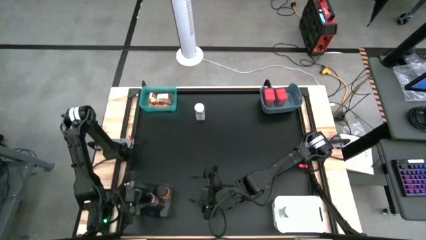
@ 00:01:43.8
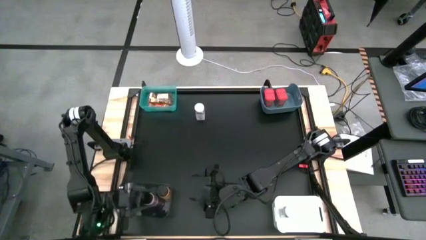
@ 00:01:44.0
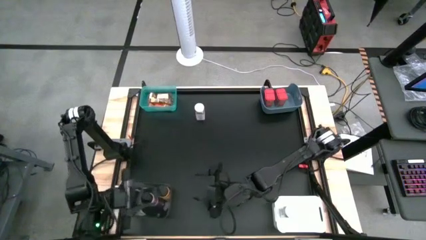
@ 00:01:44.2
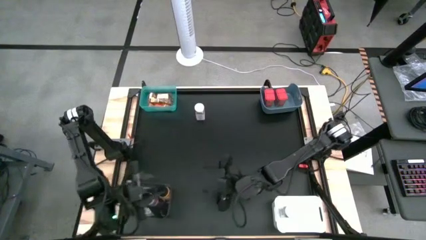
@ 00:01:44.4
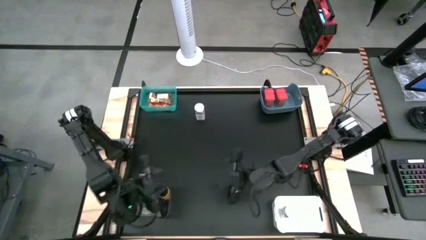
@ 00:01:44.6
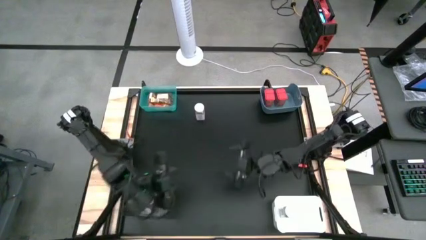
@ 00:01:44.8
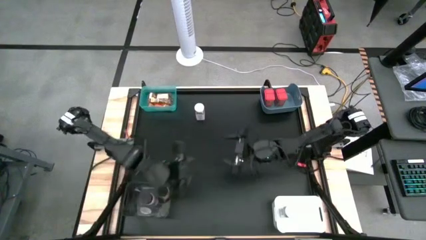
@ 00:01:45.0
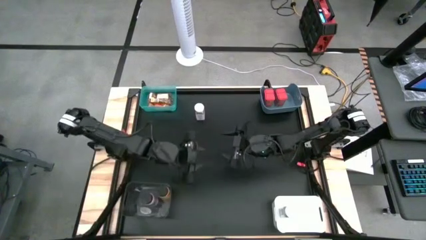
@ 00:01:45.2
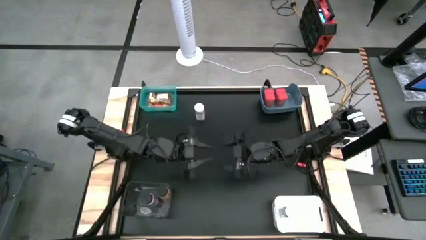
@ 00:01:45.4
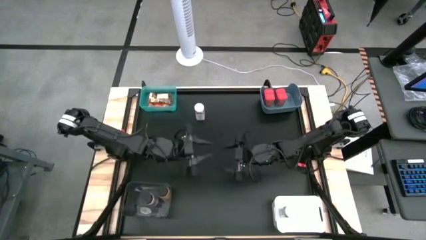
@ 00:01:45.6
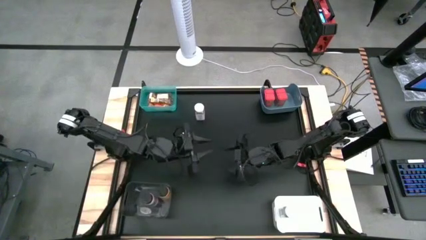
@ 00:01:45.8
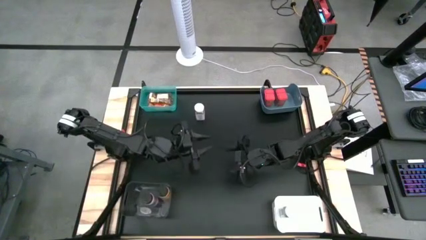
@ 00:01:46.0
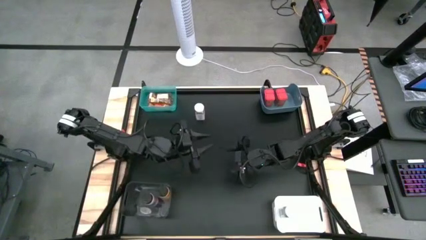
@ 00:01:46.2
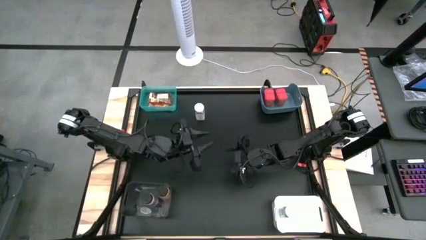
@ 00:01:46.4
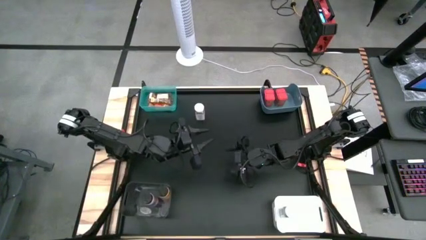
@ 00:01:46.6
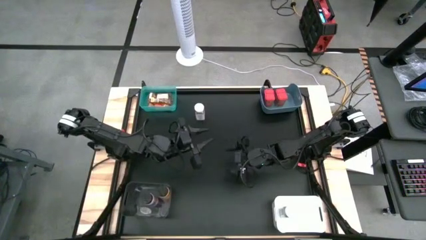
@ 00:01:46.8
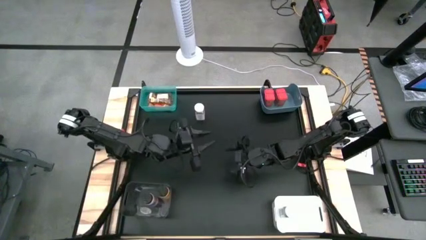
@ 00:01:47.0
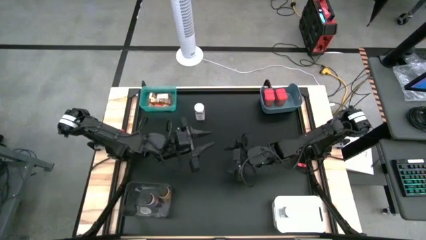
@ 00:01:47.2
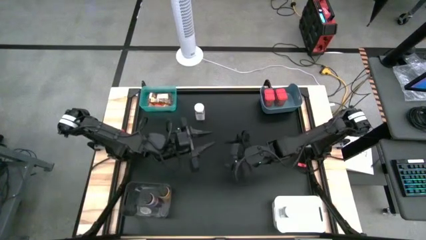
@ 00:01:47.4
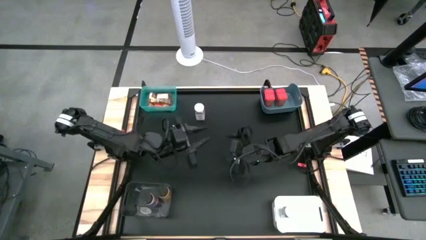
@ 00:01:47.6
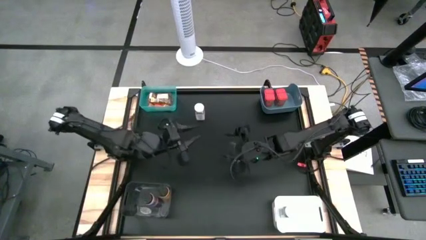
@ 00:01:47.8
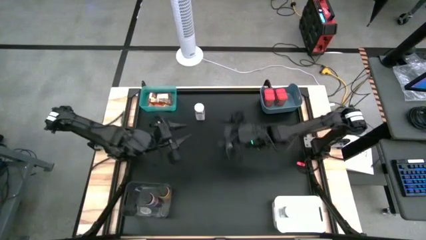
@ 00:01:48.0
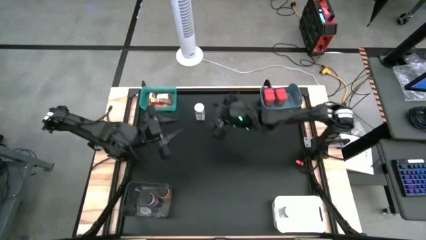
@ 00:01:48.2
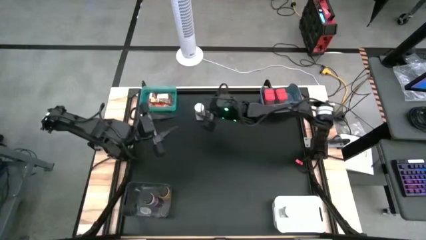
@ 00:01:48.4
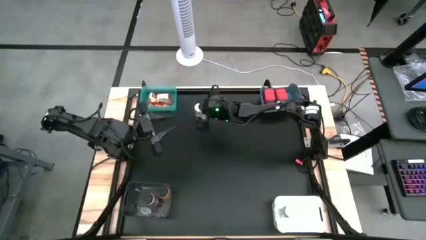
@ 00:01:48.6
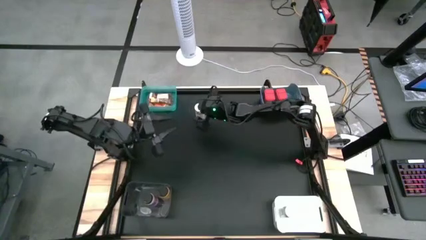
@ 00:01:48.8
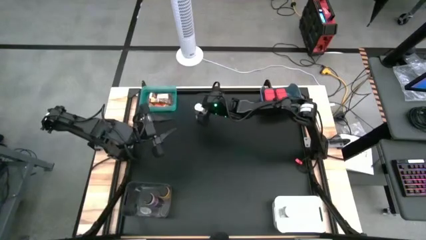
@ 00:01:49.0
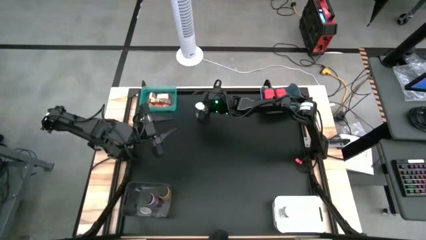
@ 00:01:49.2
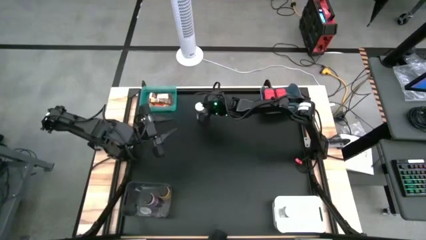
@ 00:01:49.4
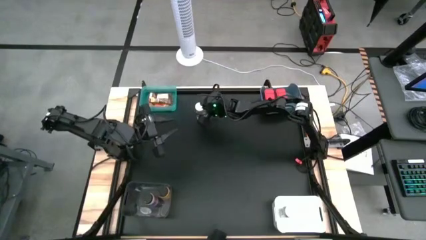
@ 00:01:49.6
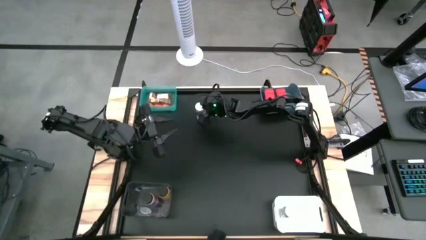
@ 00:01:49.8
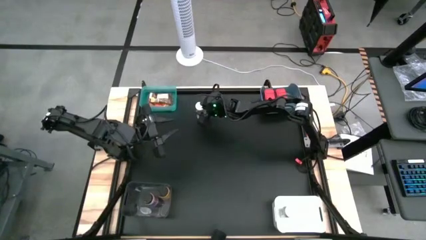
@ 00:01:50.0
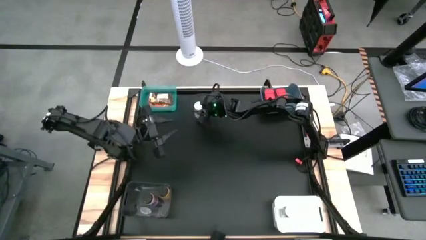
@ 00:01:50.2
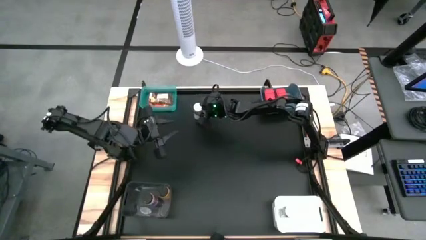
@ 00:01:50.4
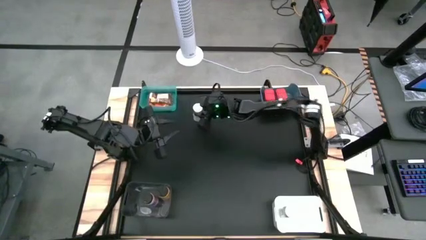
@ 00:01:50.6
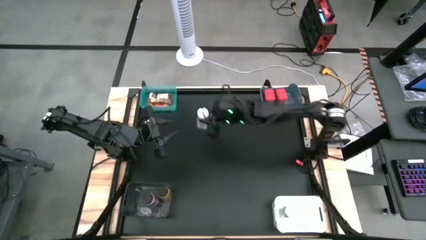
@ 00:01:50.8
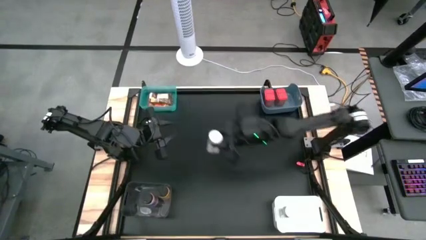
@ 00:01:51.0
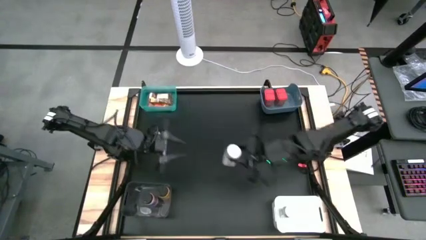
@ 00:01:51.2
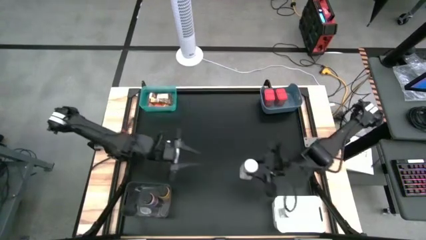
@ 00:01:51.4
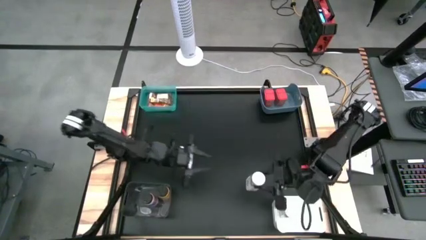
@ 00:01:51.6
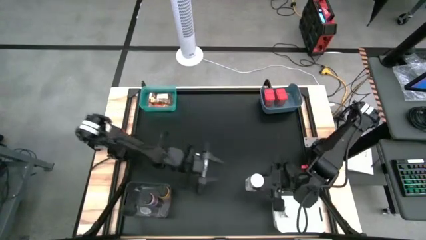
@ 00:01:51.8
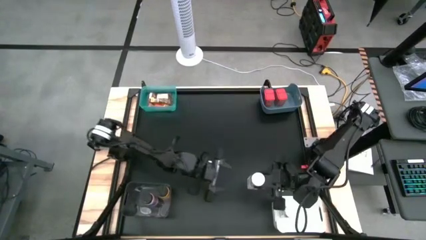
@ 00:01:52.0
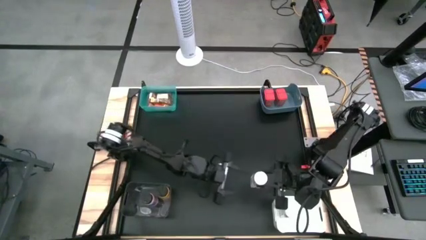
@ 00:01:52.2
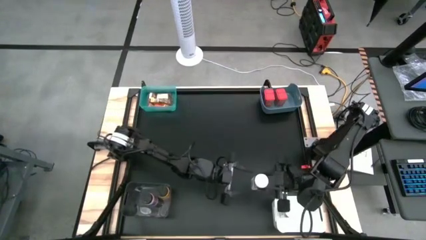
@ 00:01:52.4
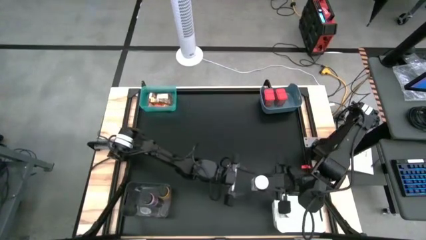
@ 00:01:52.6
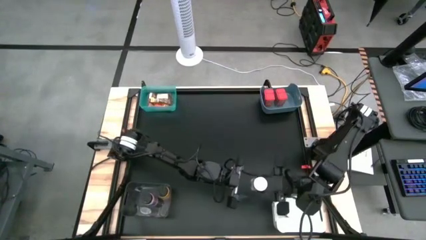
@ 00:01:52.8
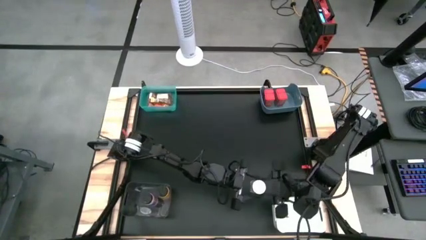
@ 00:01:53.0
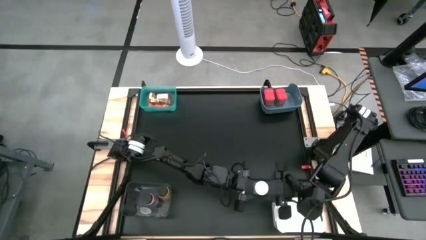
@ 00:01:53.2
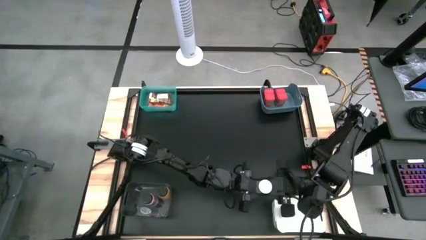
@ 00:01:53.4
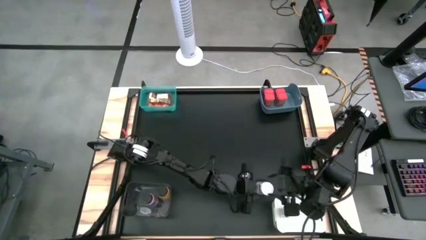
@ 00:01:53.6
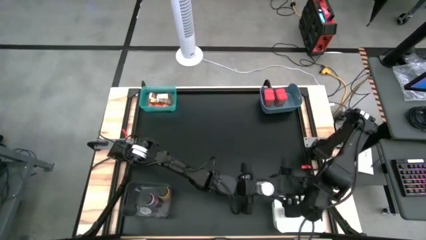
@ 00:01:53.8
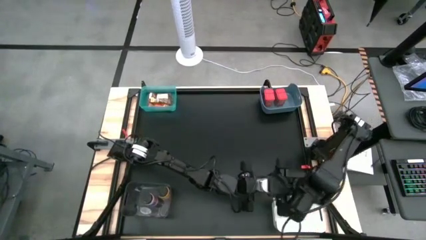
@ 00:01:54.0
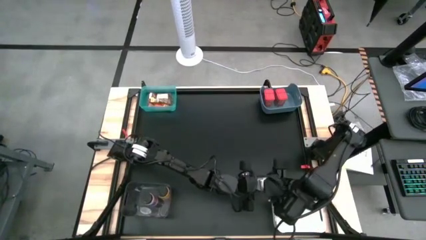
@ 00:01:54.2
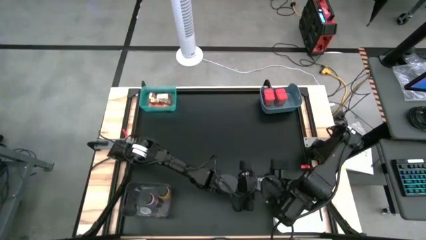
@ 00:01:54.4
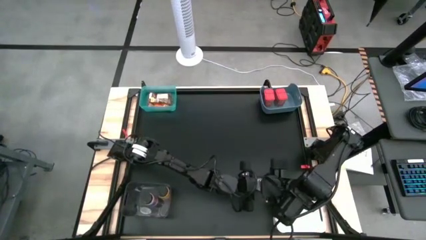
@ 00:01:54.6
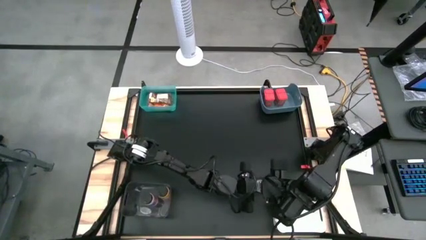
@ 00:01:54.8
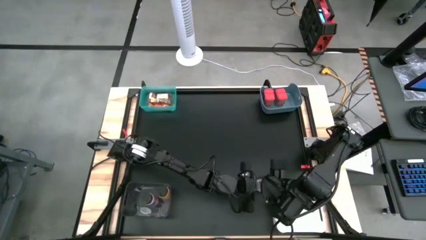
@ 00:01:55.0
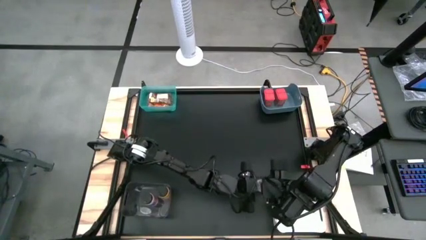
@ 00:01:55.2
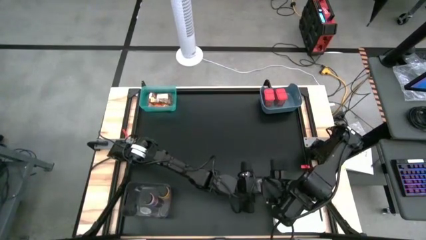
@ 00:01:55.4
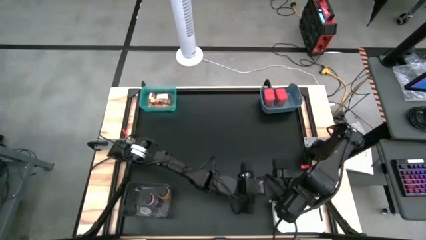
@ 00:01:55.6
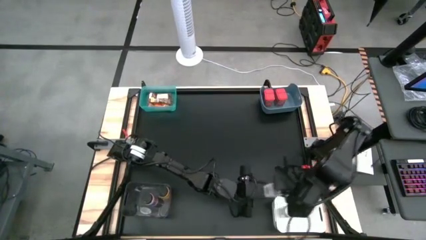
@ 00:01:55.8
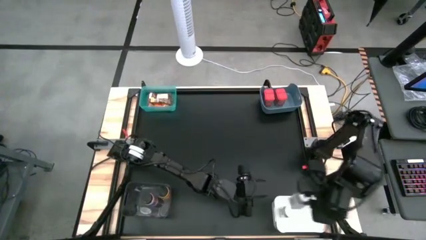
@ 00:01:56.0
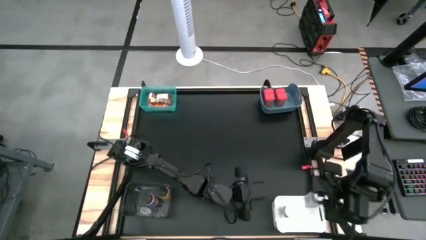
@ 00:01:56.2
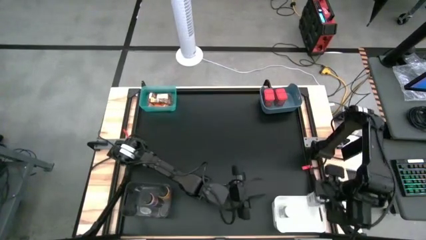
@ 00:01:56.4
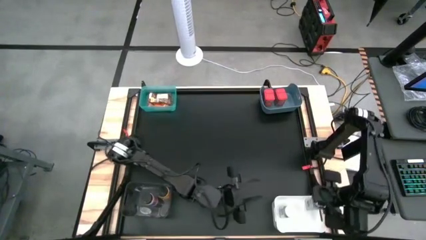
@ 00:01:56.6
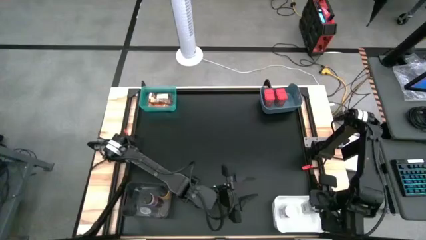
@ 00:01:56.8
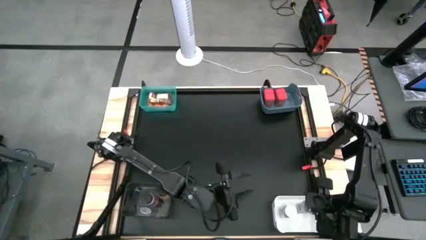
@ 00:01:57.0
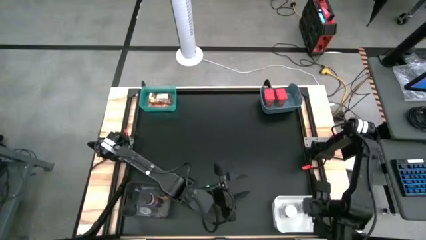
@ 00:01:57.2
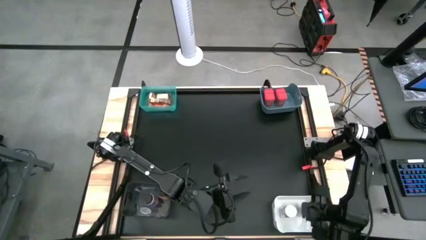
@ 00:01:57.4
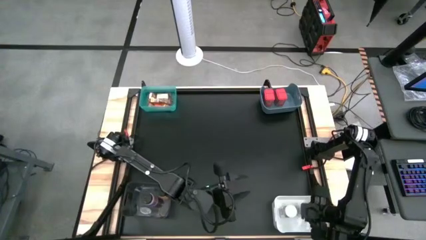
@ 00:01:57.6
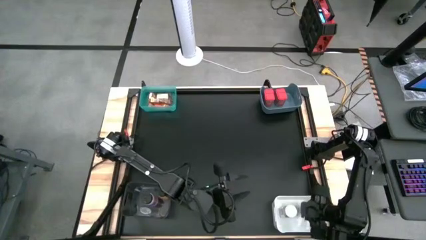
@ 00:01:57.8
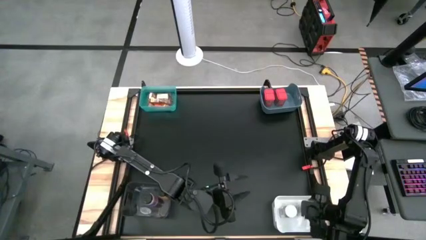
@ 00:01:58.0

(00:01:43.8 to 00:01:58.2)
Task: Sort spices by type
Put the white seasoning bottle into the white bin
